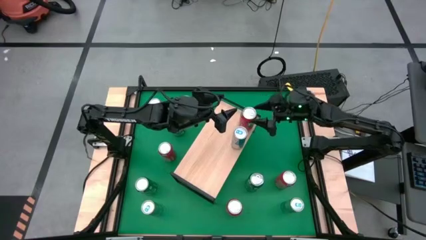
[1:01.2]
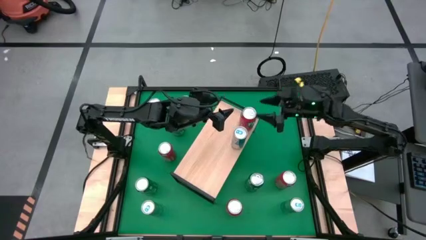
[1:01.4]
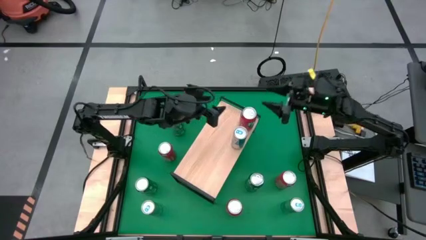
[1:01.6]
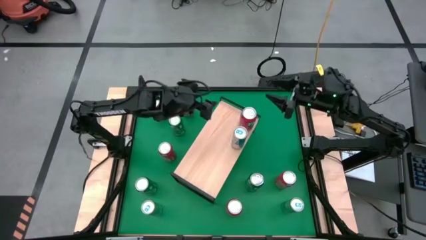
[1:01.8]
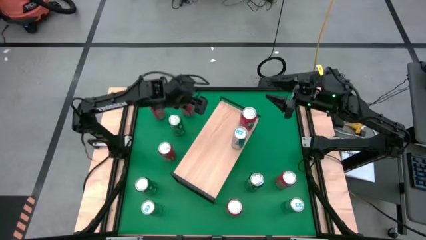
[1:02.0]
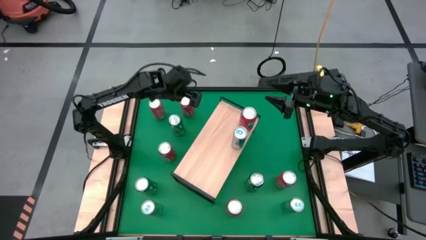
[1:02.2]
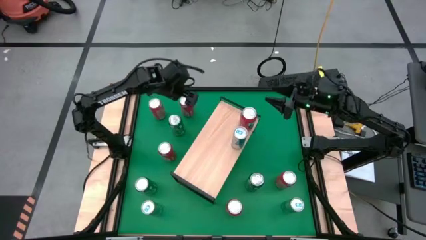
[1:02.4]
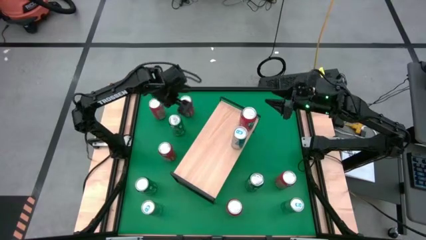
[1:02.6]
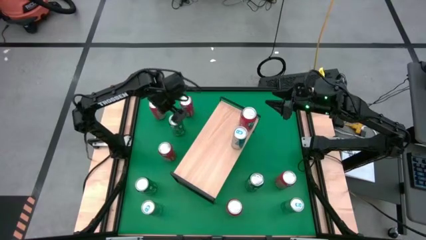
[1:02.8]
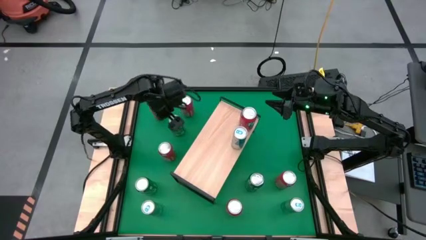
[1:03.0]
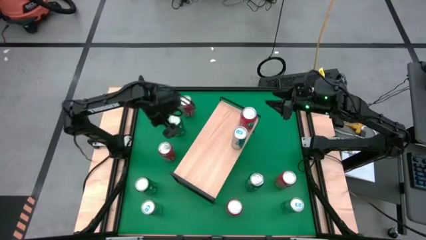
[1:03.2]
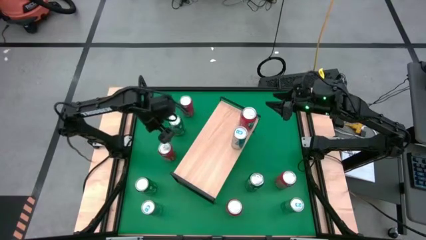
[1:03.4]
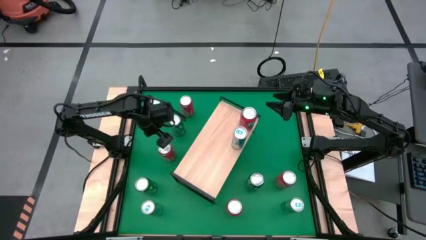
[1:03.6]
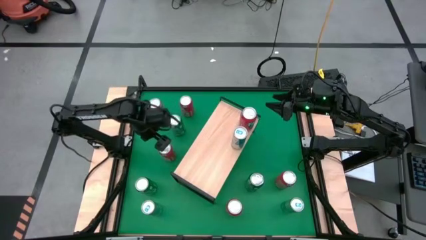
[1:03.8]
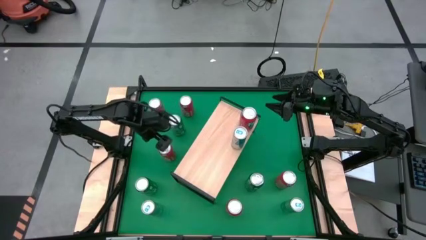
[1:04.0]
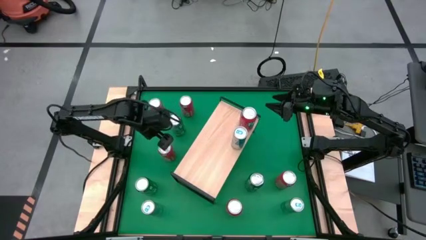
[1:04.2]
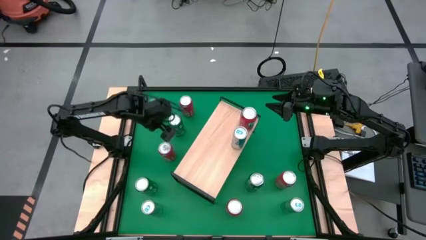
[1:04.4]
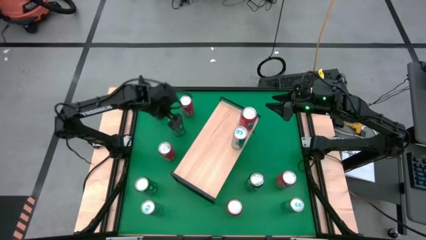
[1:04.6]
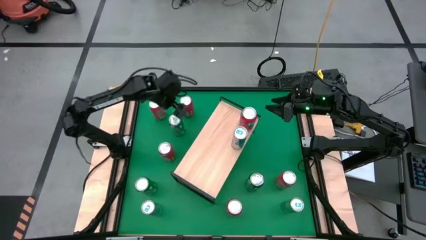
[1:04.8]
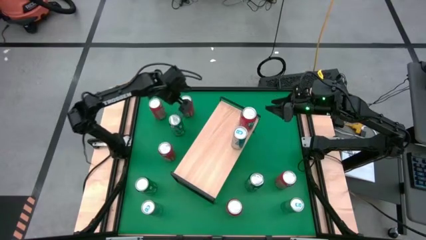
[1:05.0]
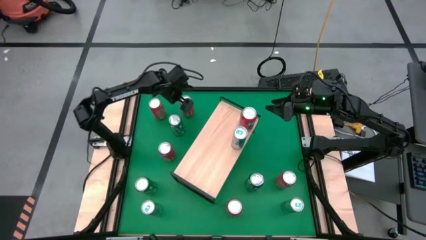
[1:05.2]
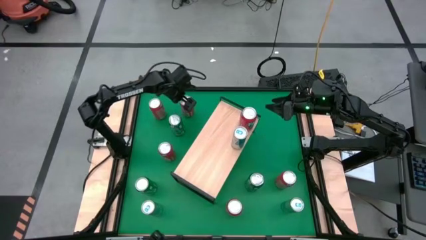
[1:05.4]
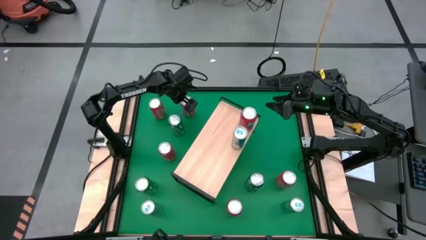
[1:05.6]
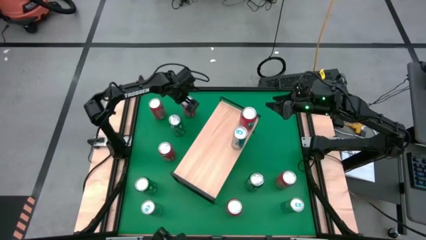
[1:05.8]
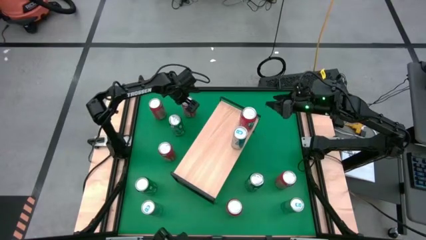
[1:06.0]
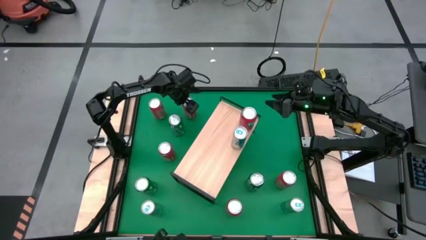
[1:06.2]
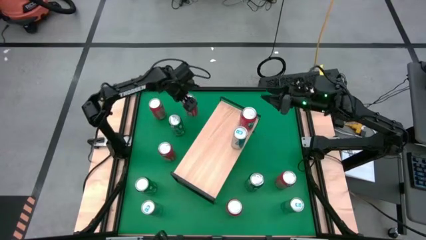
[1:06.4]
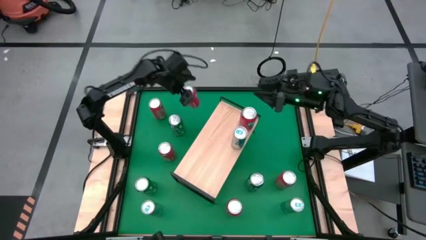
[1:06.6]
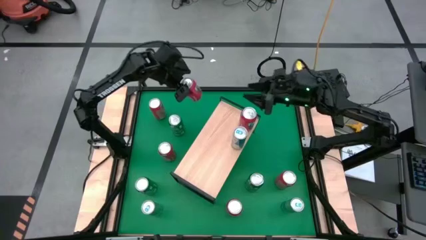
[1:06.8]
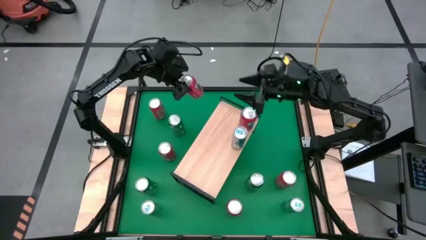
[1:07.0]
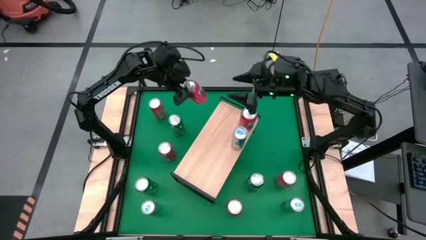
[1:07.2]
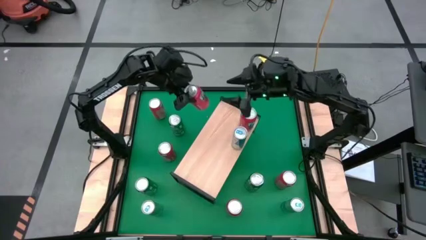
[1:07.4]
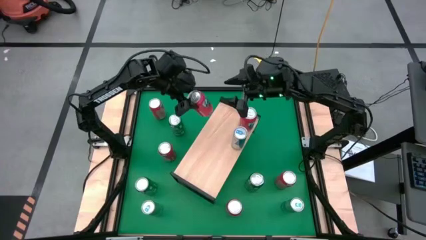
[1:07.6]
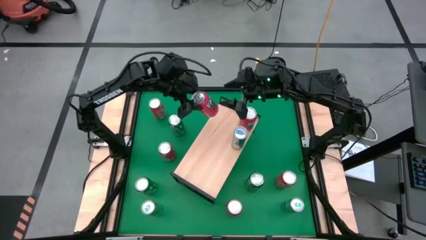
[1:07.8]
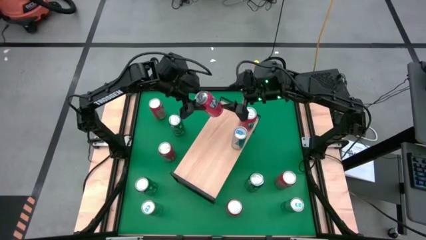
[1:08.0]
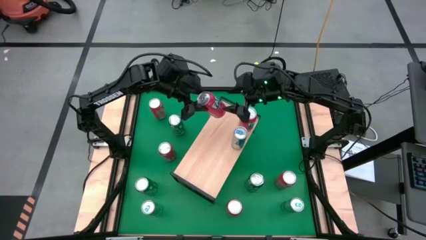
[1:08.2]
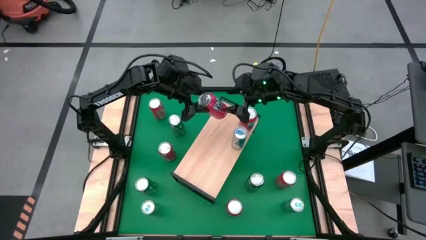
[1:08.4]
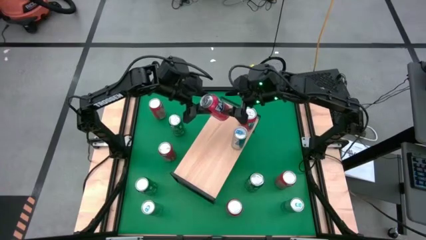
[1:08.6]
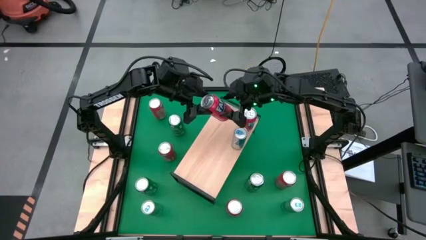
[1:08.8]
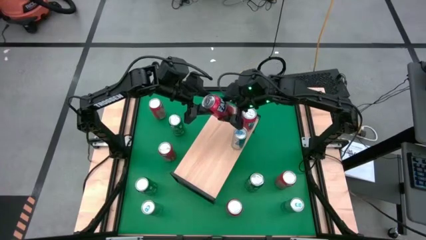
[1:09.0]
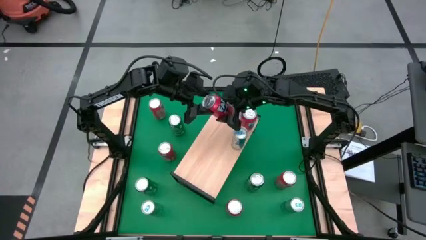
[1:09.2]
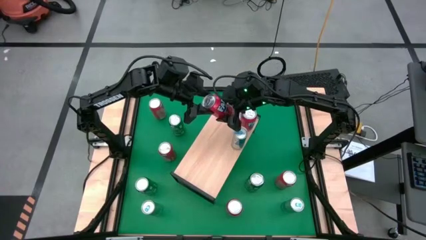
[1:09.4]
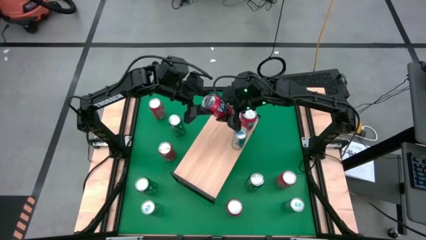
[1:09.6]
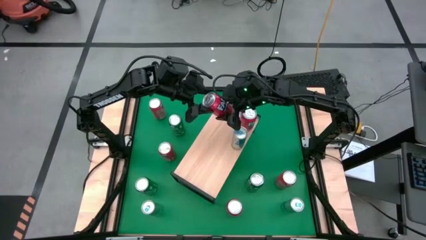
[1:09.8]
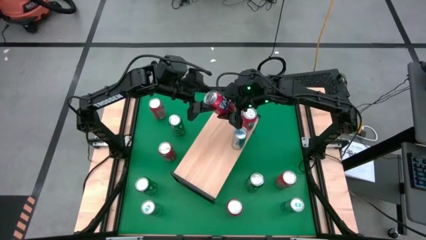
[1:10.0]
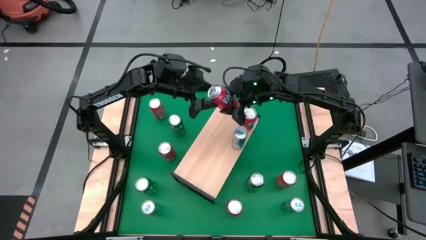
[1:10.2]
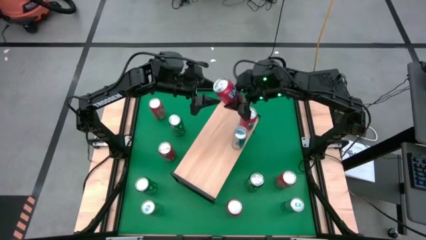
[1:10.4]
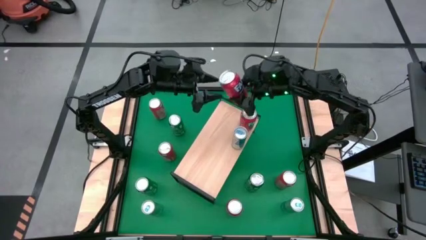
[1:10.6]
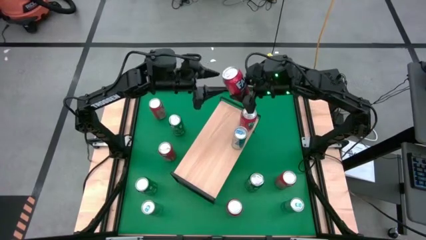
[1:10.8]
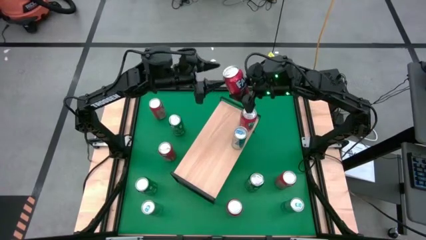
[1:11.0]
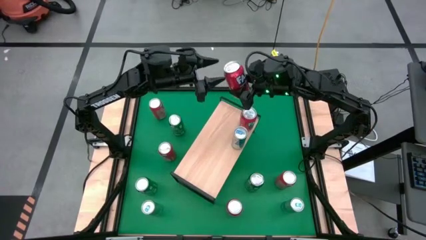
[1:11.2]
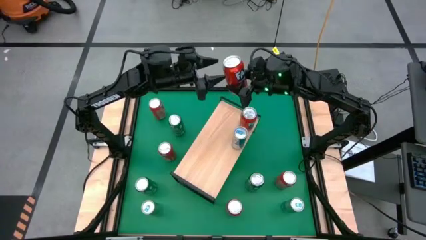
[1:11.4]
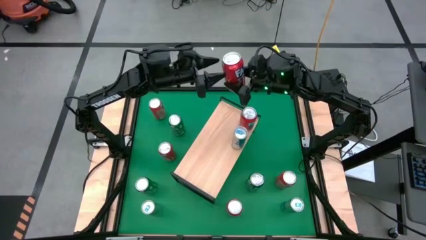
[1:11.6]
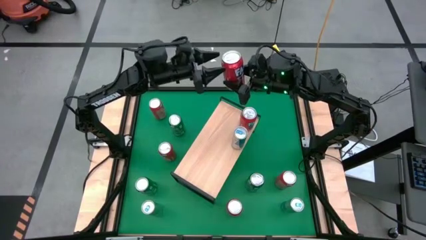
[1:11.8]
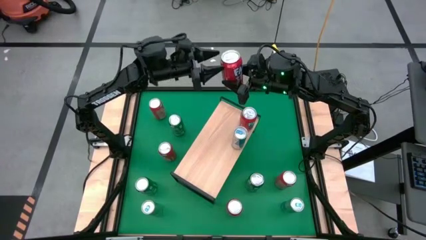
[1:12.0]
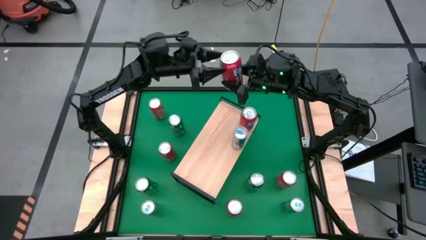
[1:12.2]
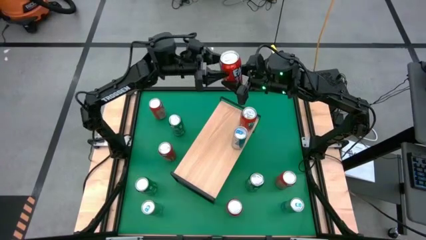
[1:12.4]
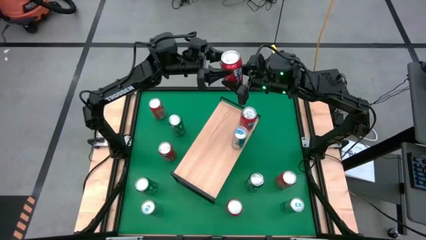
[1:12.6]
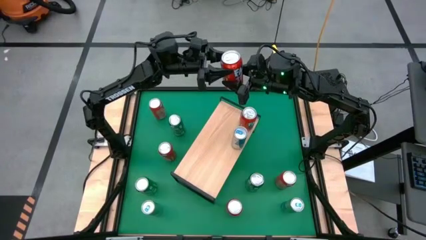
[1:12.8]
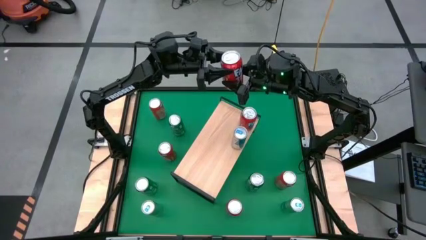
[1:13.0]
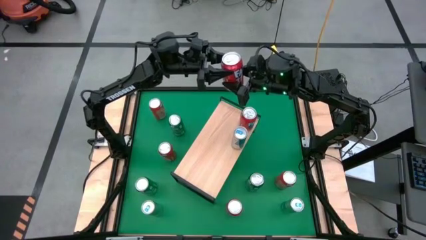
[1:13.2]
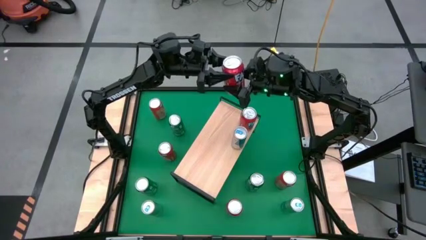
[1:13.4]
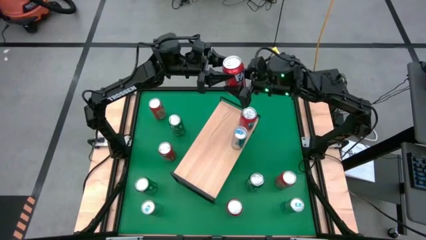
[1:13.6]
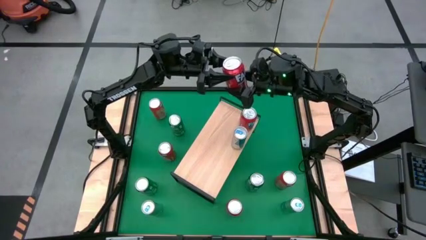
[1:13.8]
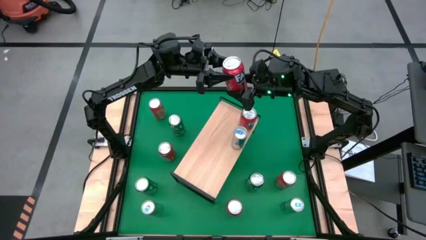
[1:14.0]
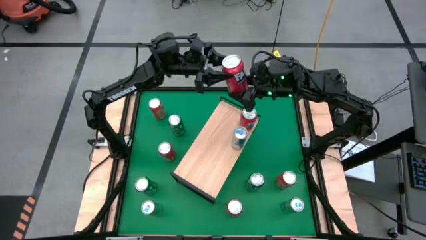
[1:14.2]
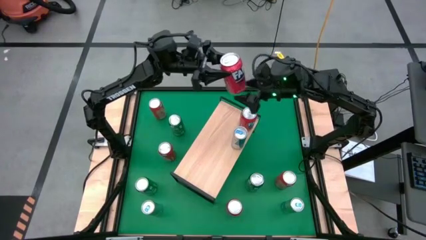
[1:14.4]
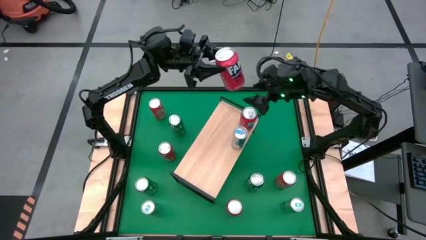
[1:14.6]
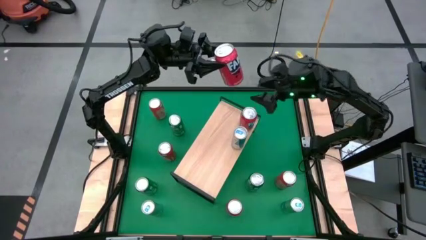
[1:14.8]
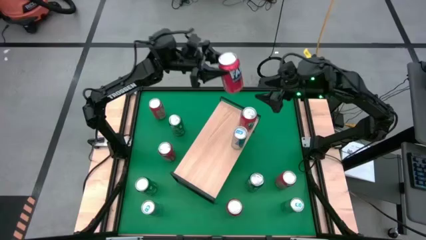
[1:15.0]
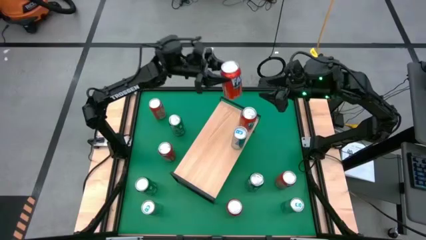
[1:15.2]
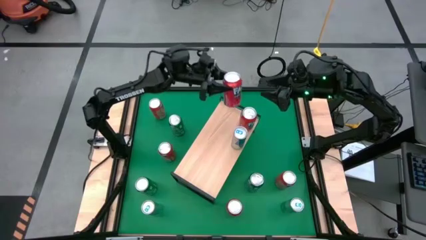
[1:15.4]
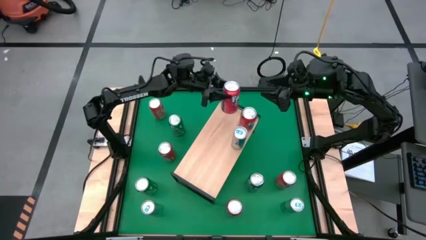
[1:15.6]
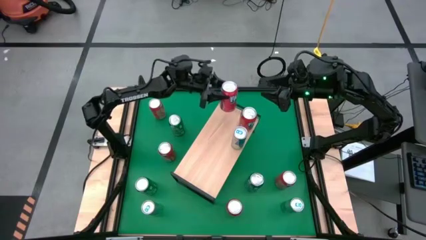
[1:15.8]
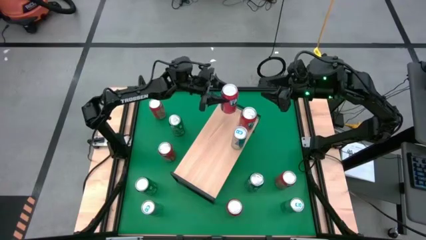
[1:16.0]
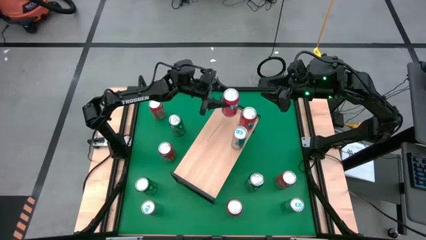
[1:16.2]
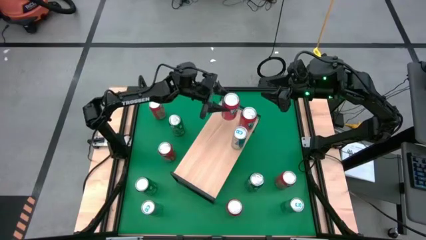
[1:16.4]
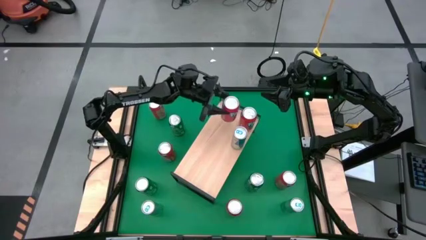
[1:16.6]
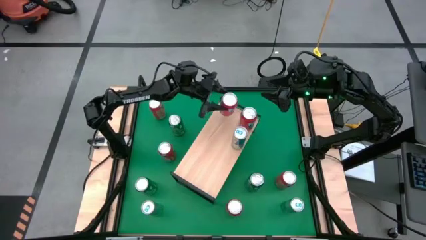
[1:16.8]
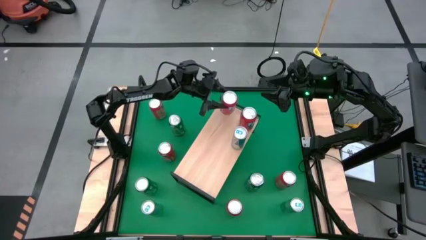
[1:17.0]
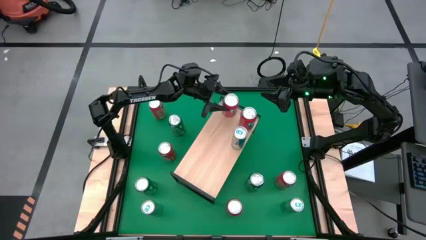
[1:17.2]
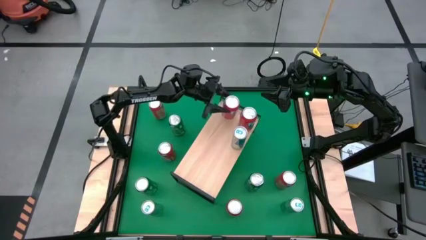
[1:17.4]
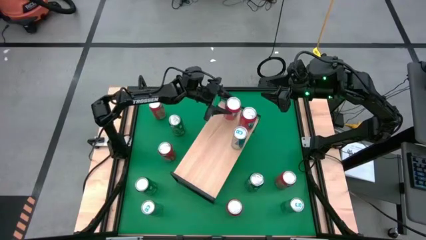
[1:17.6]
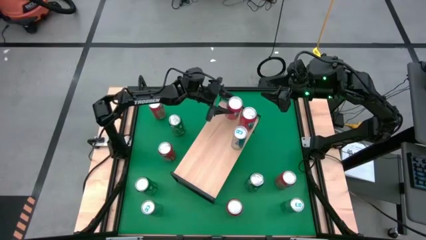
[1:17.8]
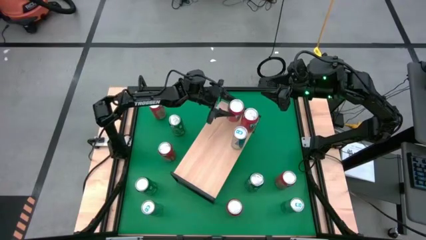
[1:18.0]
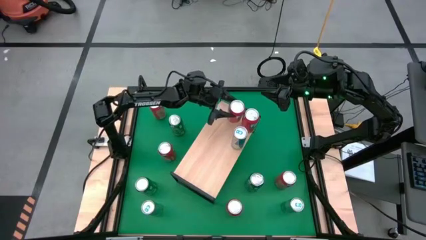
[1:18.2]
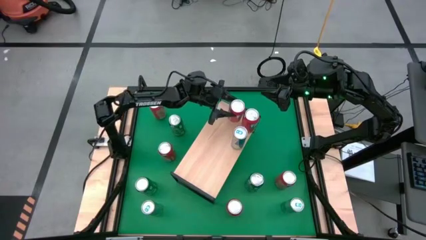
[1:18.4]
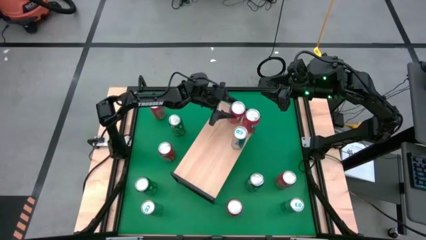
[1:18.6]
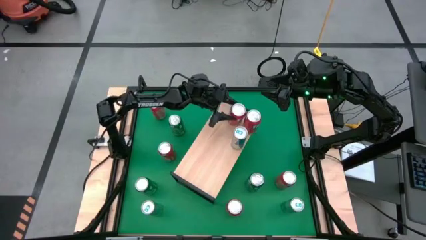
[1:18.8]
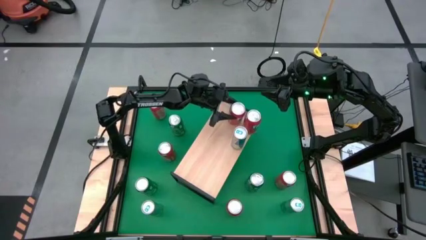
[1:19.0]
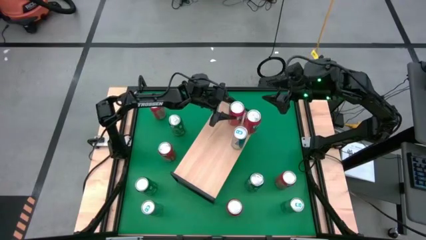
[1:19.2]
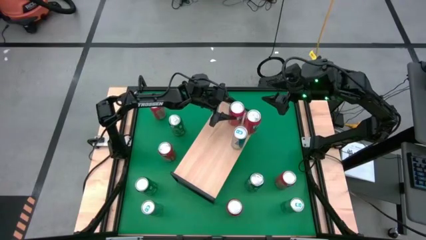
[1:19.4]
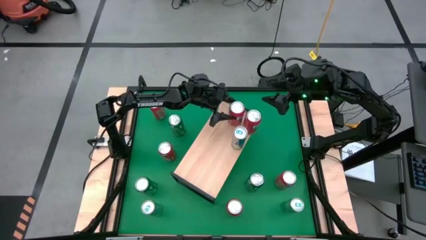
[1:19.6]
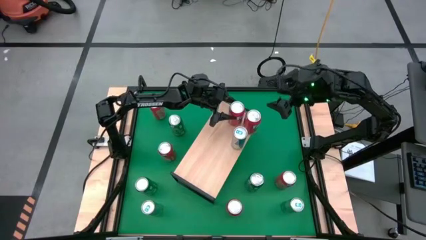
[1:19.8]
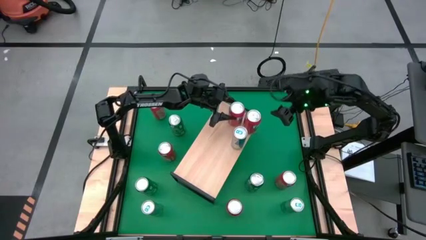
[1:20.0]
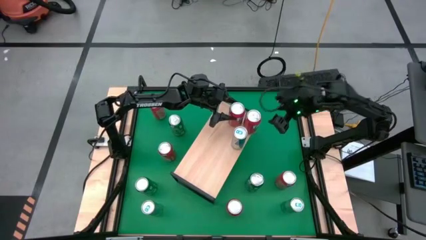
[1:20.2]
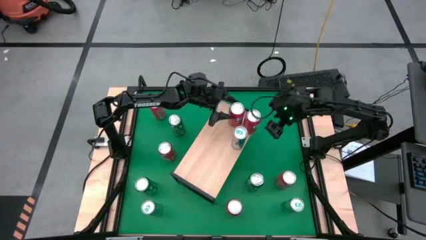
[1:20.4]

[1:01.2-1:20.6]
Task: Sort soda cans
Put the red soda can on the shelf and align it with the other red soda can
